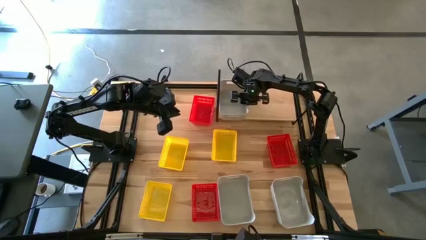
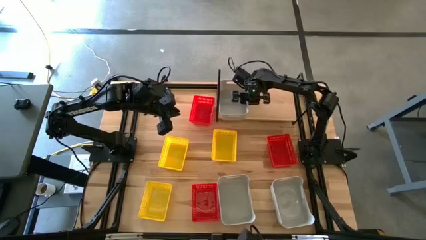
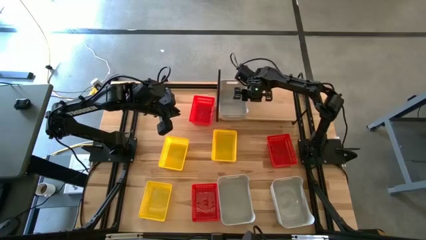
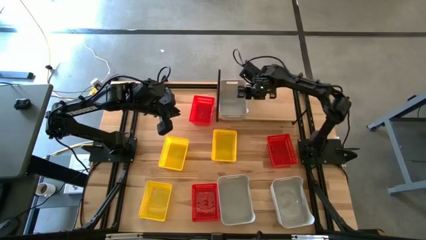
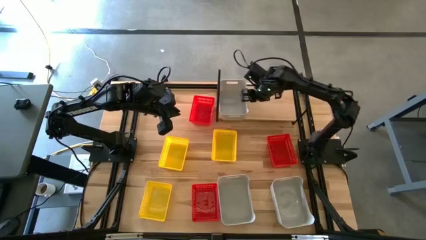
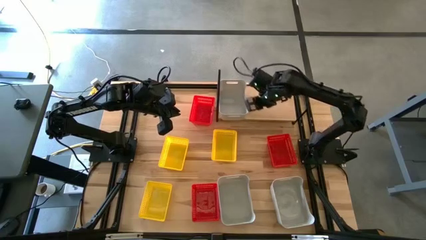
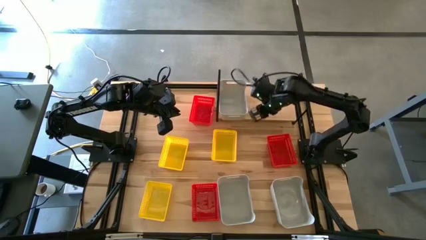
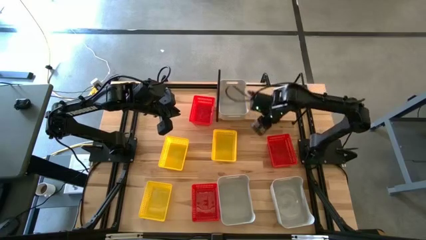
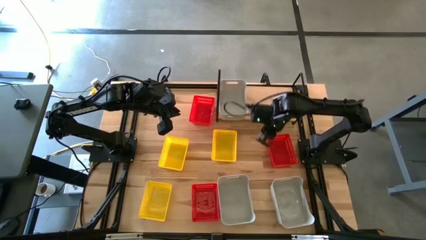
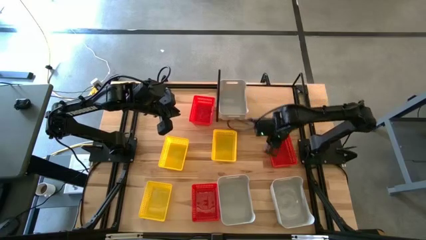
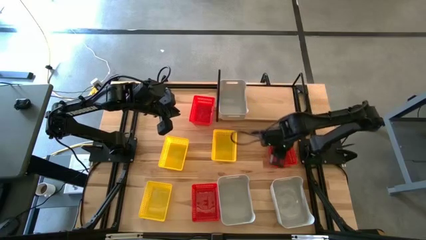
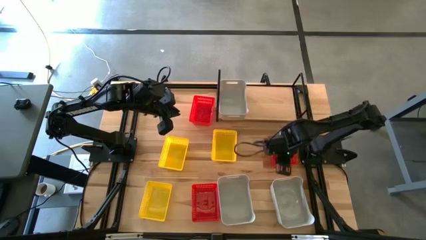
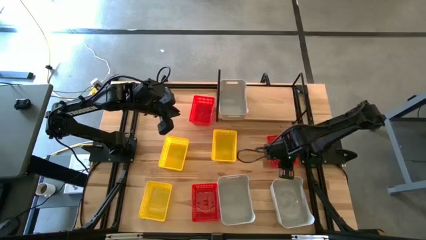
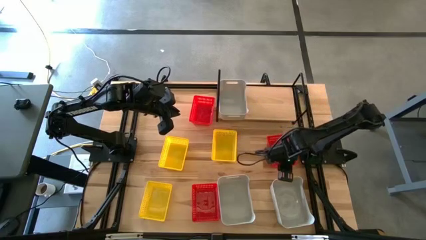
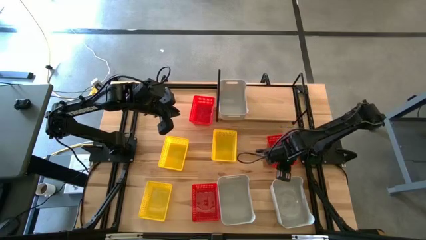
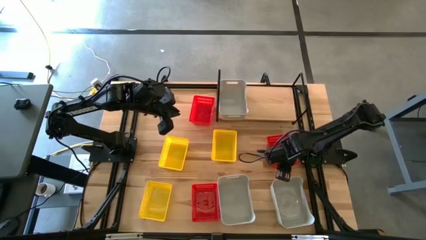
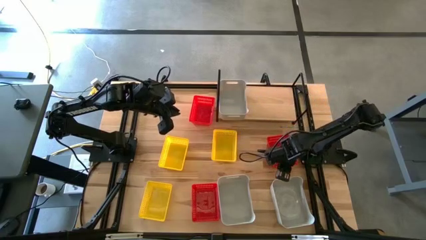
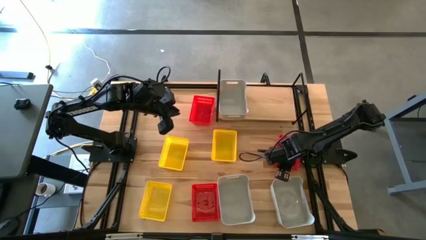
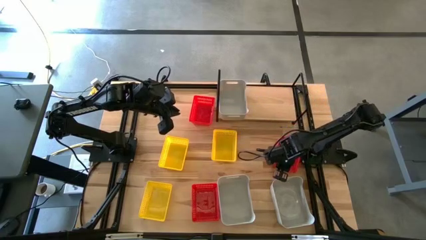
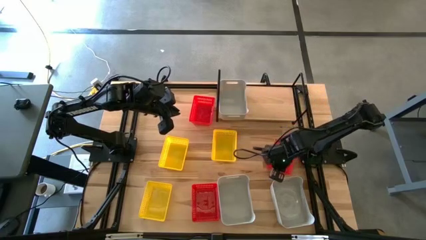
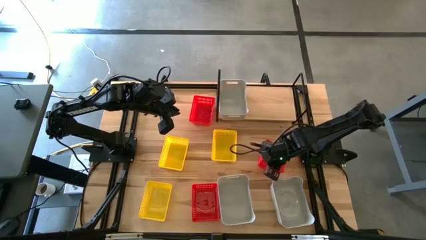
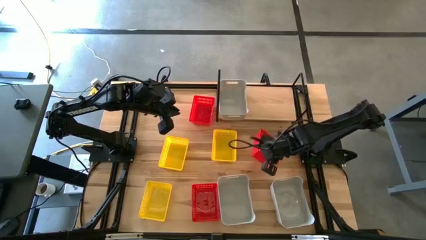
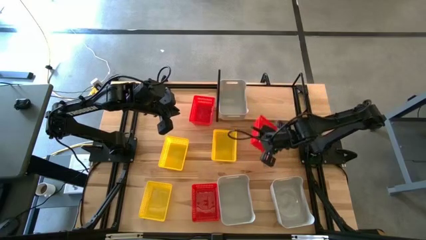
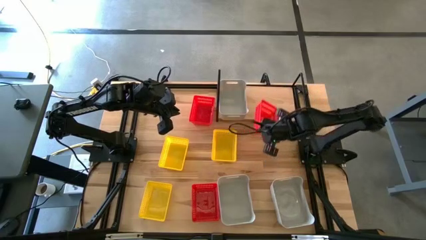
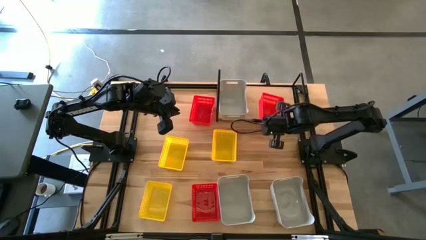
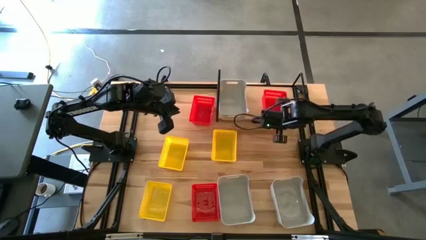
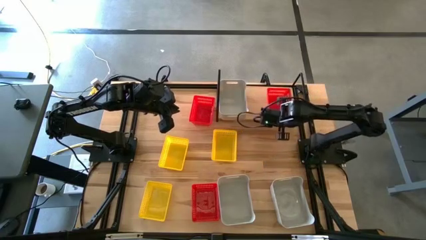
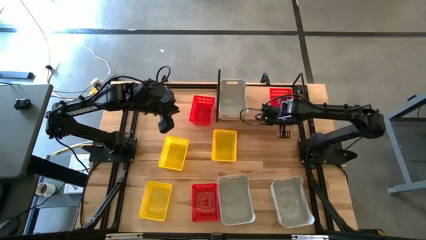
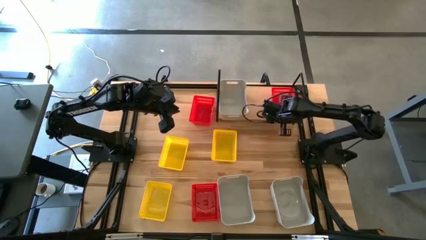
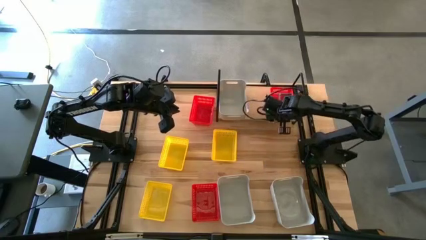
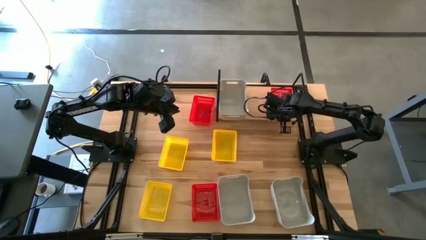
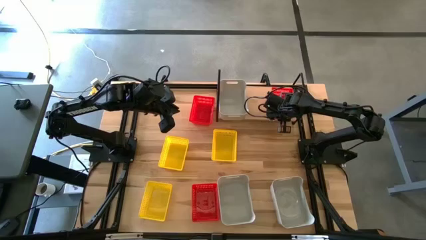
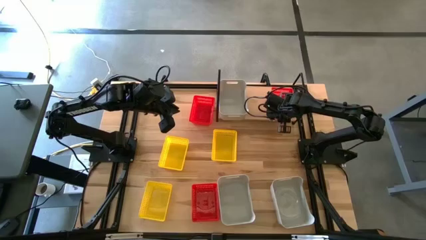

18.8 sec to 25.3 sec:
Task: Stack baskets on shelf by color
Put the middle right red bin on the shelf

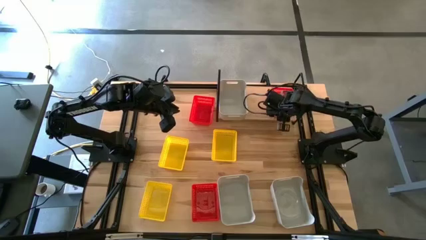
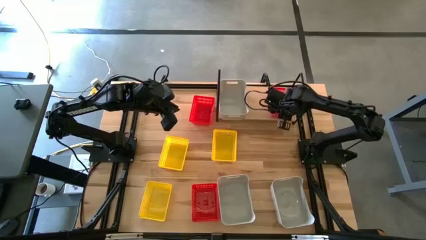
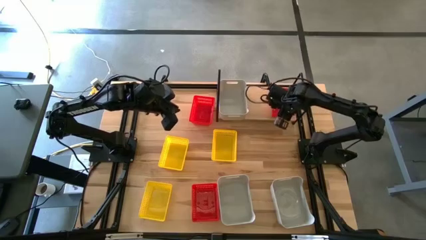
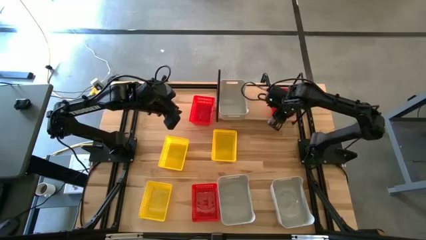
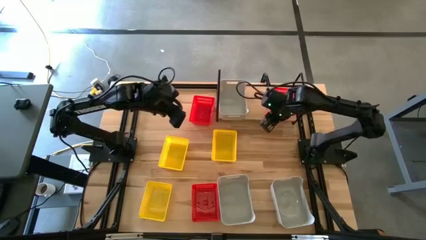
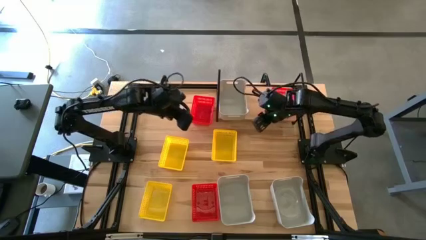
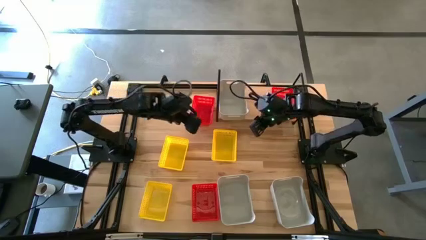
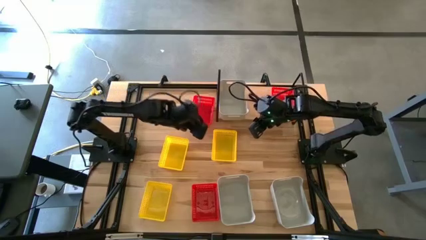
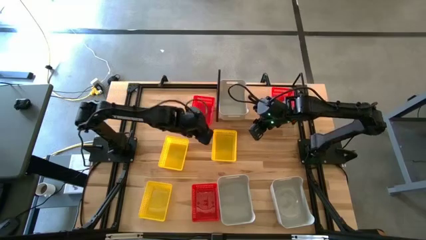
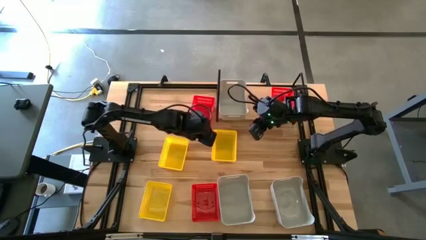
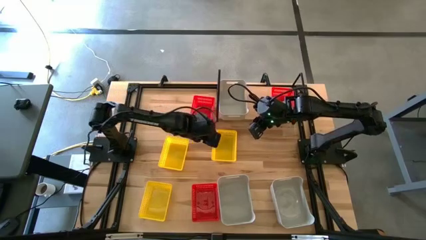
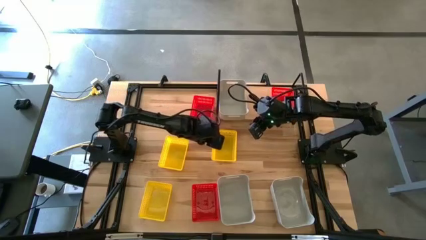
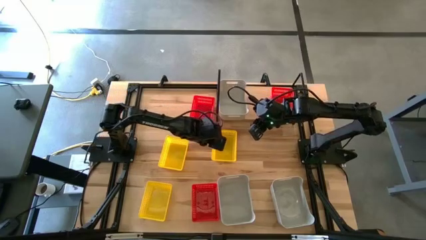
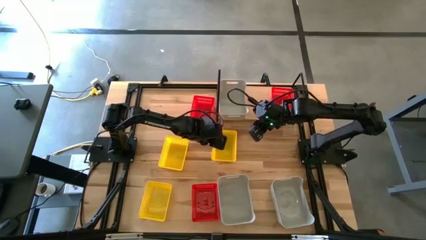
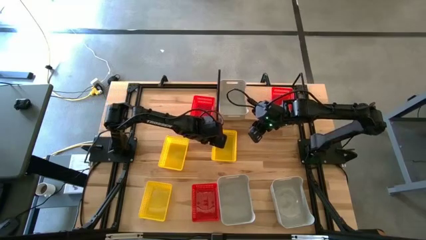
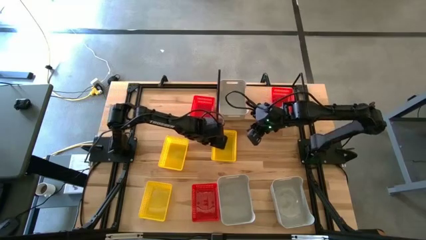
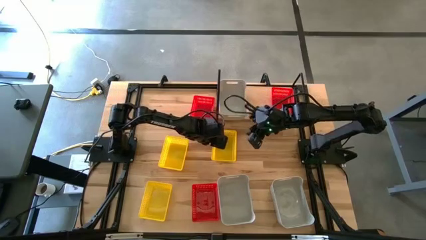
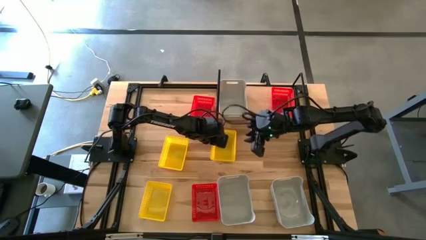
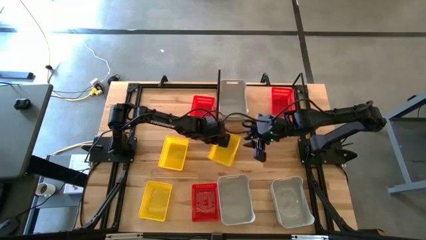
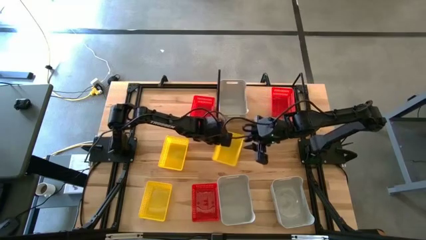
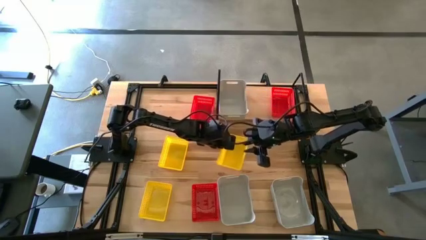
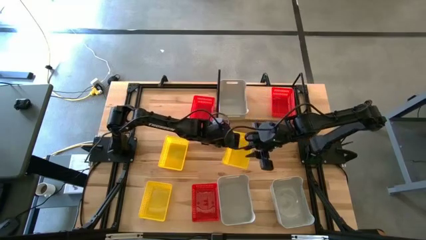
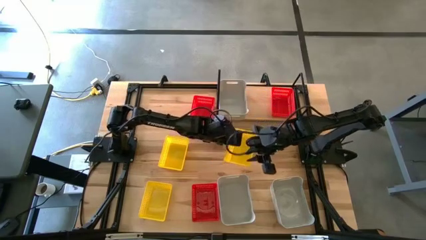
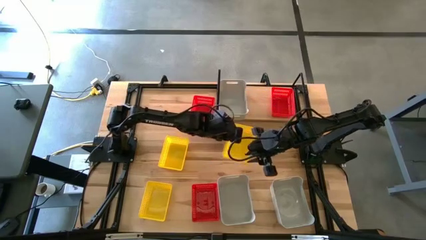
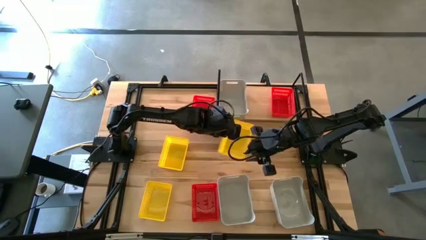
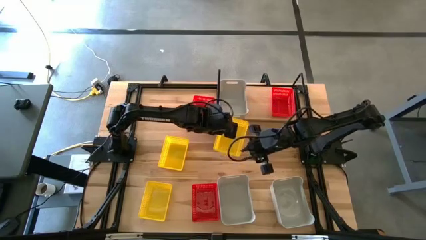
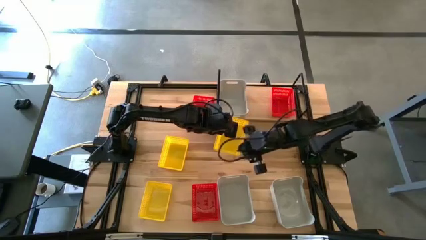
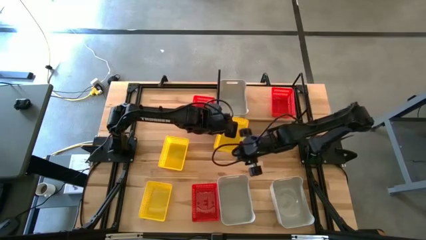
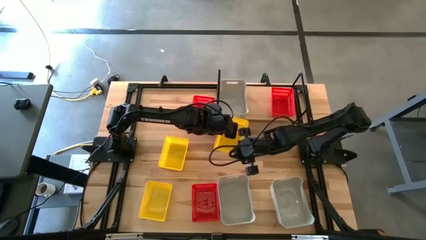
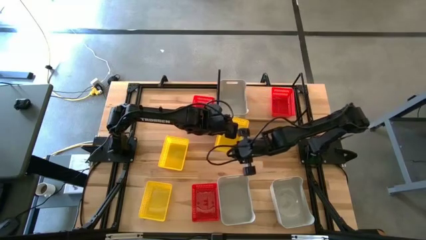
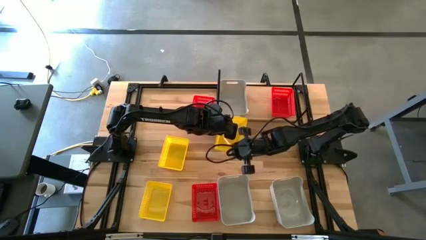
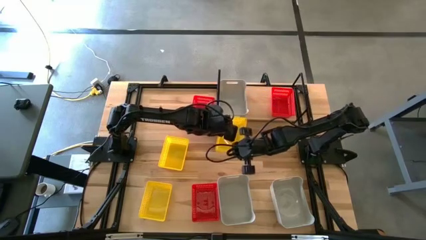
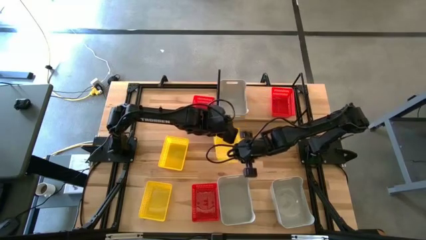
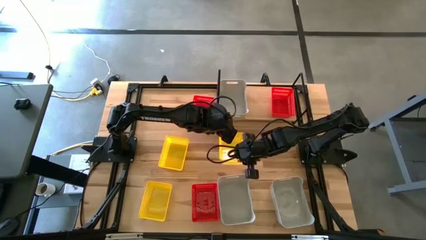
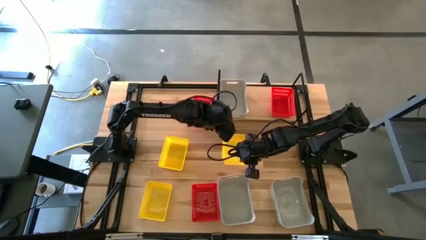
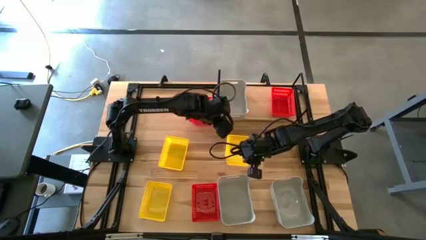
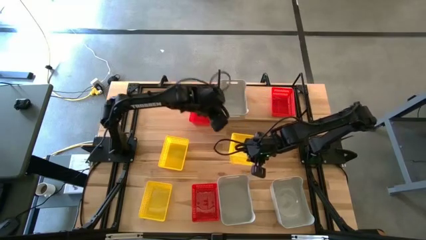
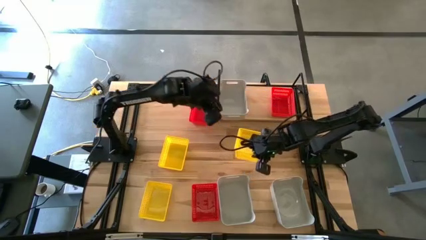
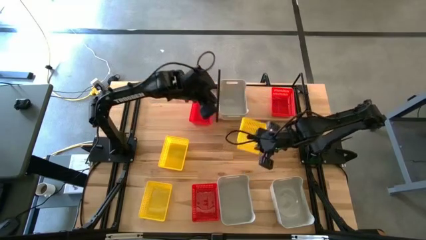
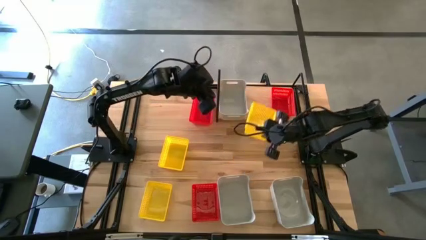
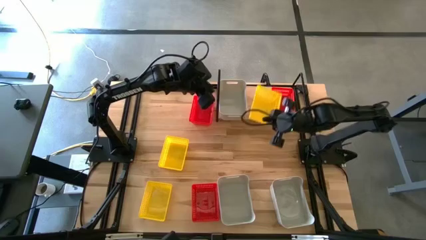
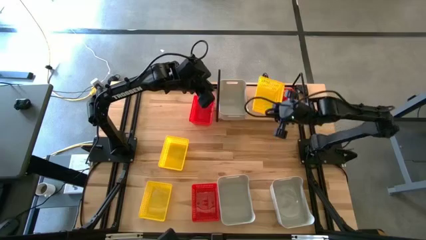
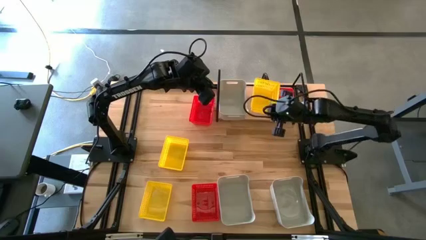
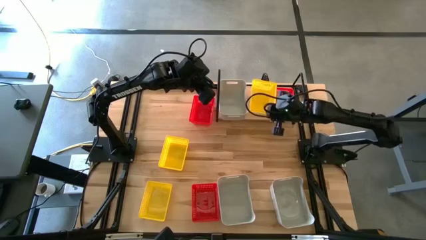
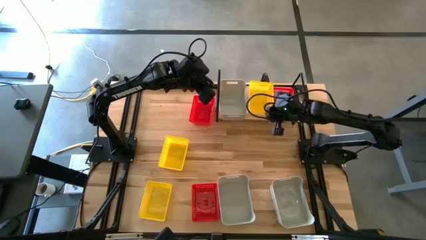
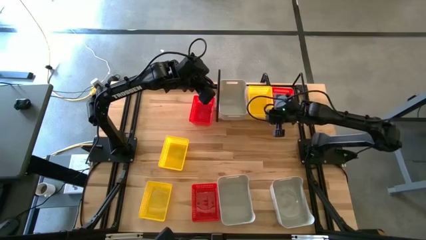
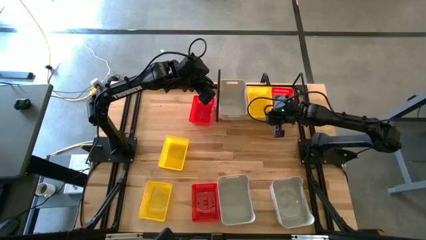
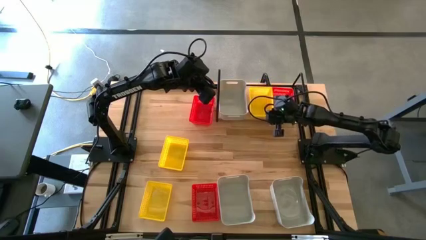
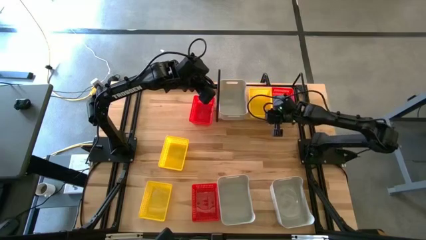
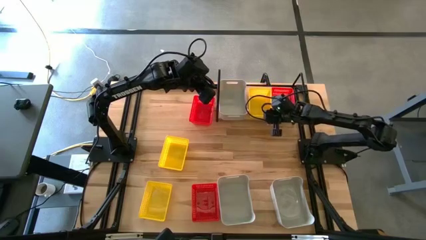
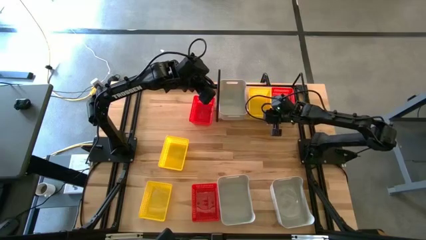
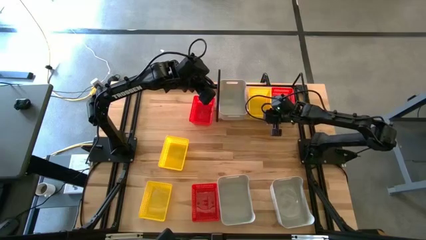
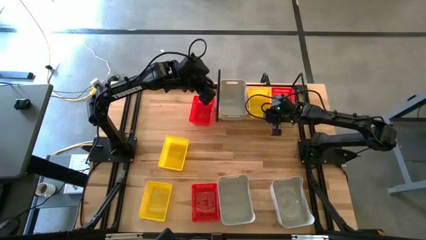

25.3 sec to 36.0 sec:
Put the top right yellow bin on the shelf
